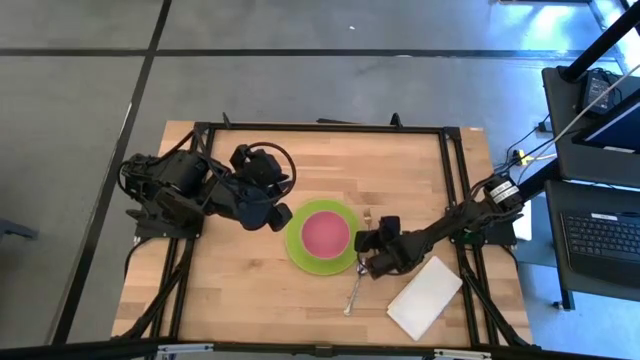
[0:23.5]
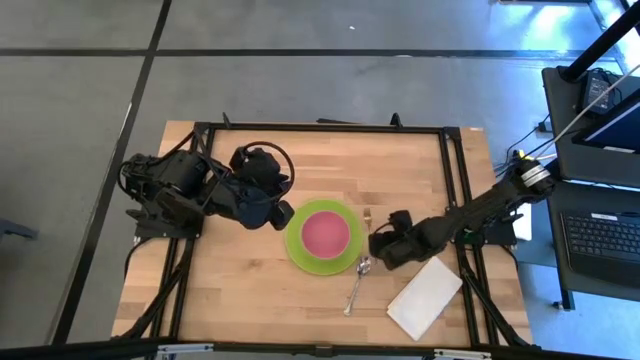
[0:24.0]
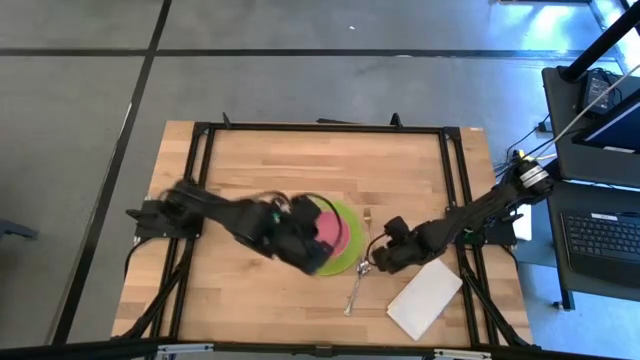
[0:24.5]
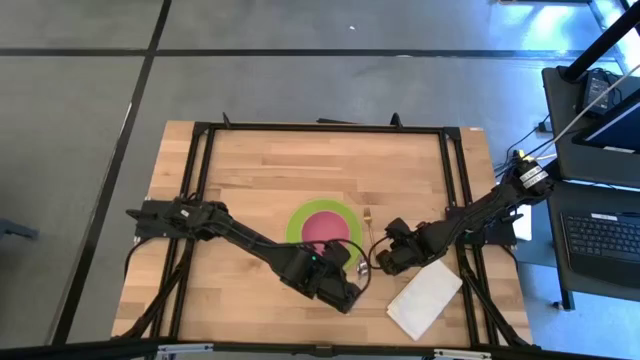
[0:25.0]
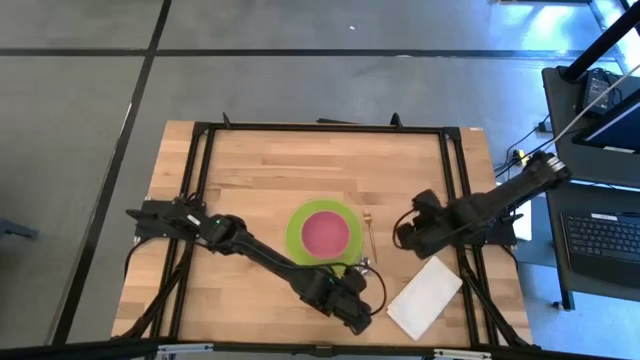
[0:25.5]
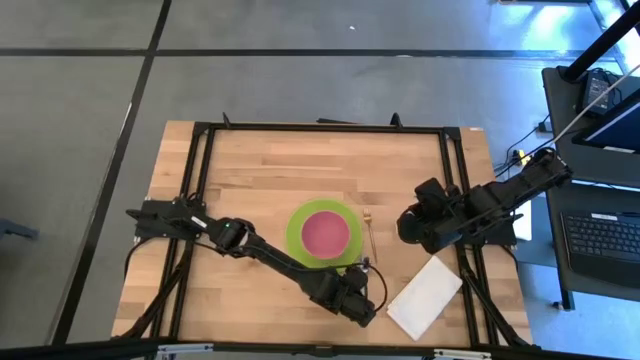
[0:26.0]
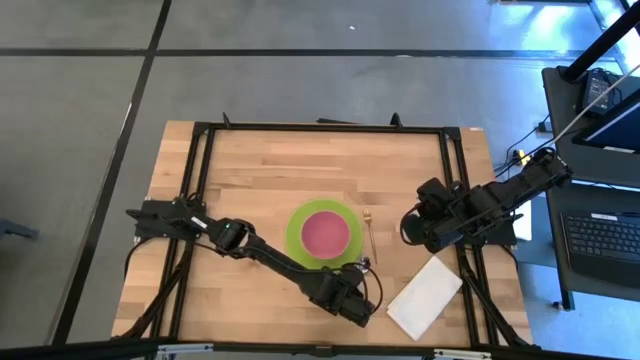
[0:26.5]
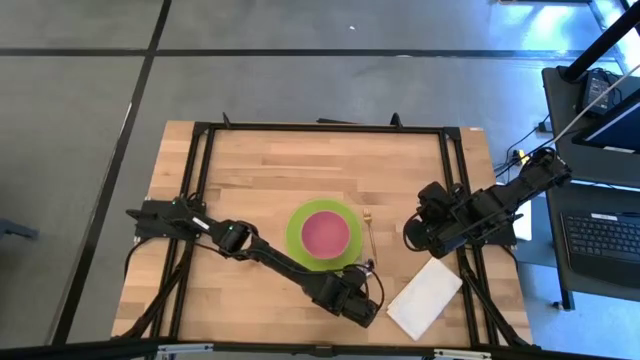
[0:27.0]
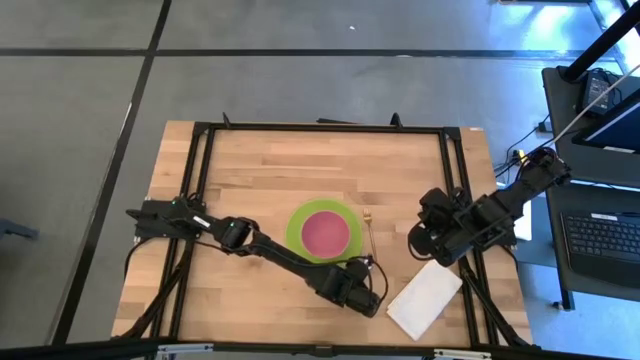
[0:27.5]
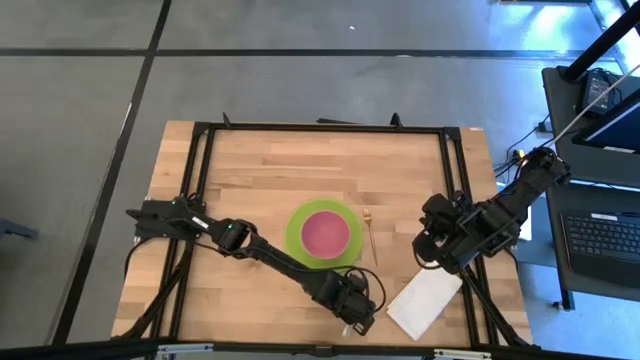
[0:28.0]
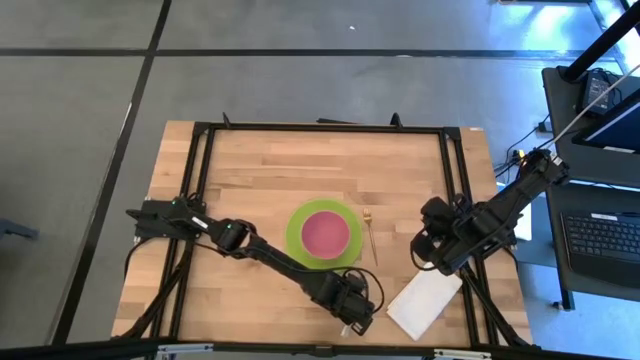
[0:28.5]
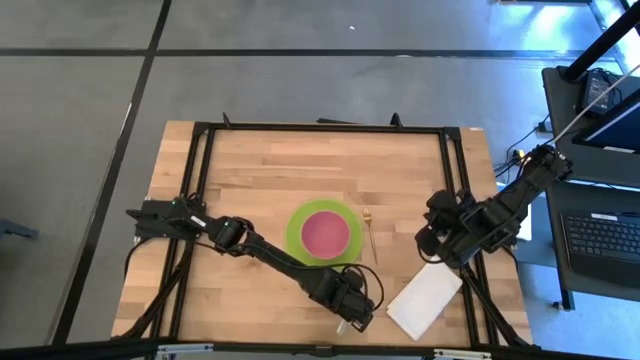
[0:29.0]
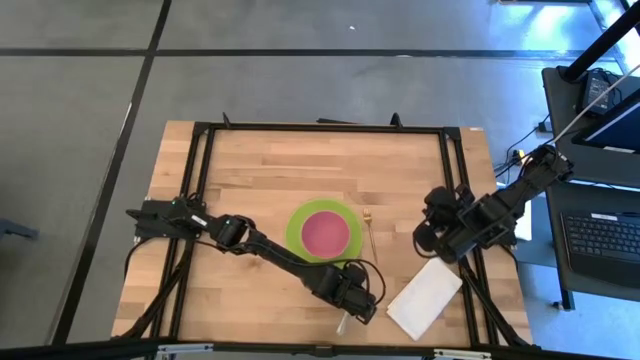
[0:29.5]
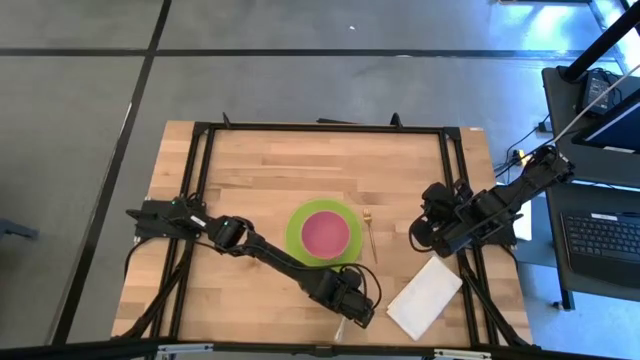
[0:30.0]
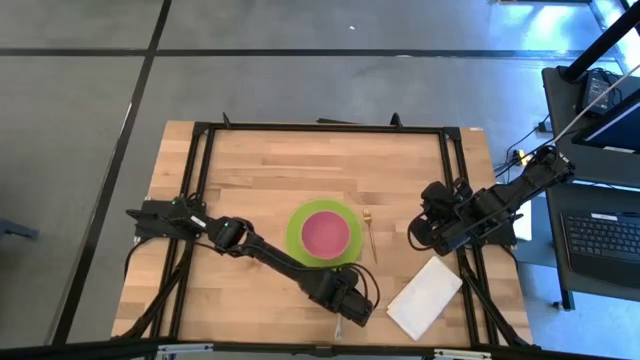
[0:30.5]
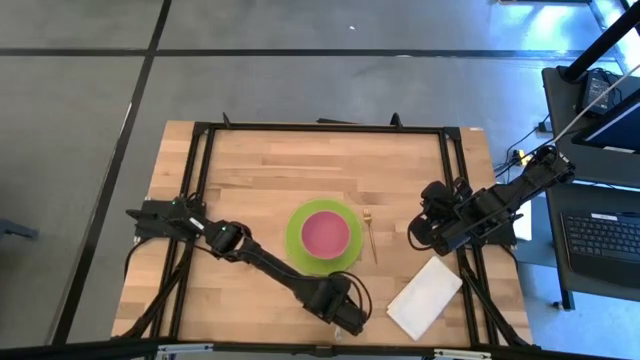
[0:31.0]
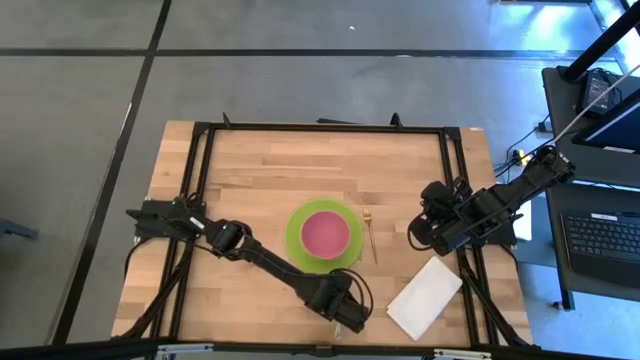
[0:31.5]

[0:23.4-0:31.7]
Task: Set table place
Put the spoon into the pink bowl

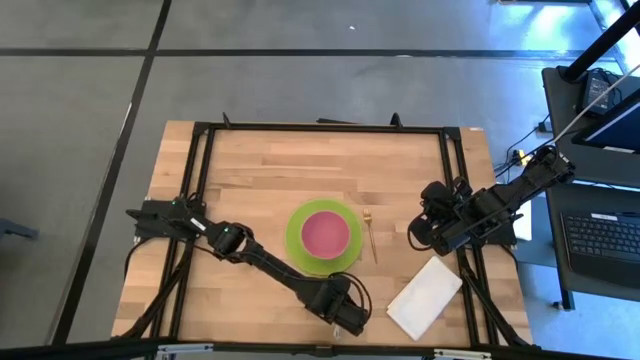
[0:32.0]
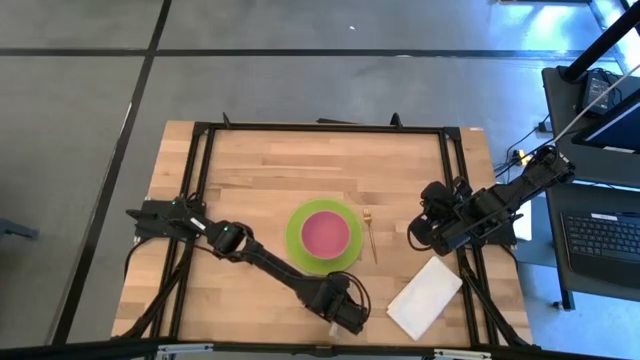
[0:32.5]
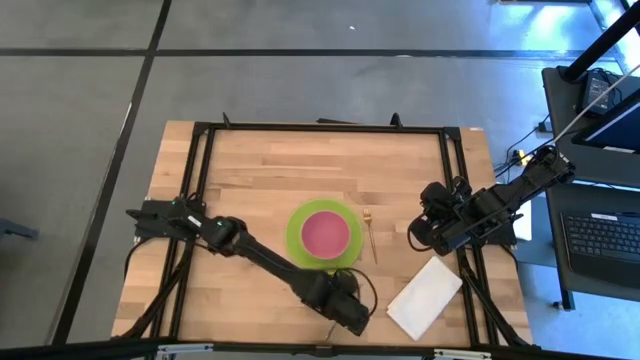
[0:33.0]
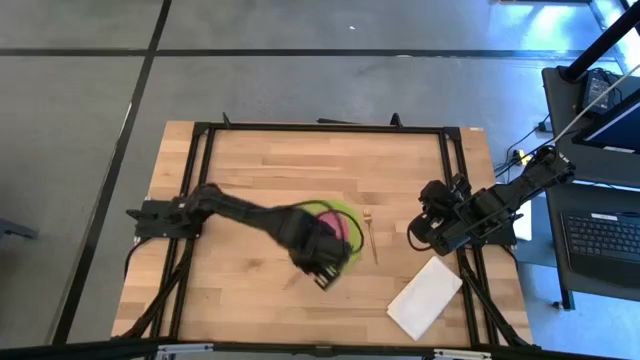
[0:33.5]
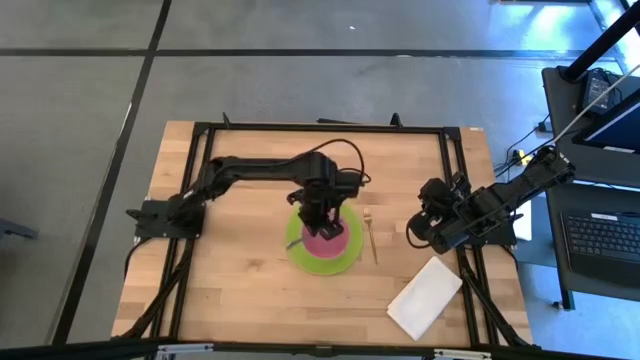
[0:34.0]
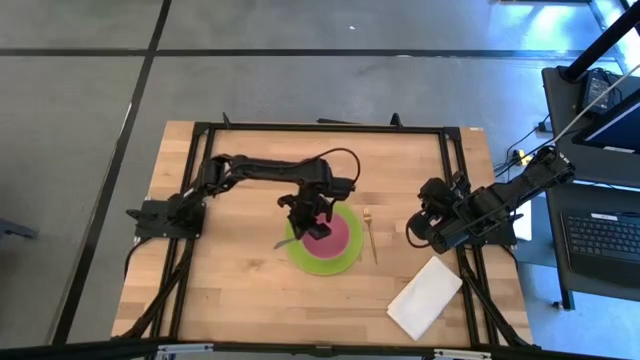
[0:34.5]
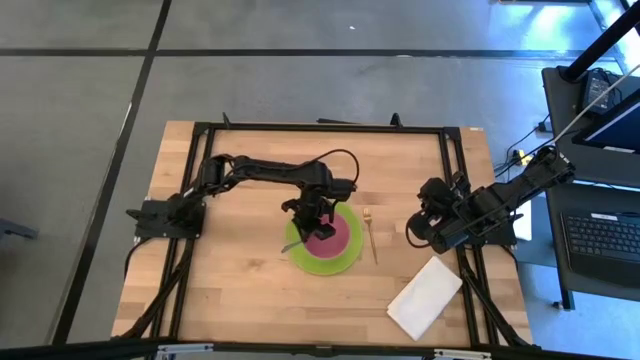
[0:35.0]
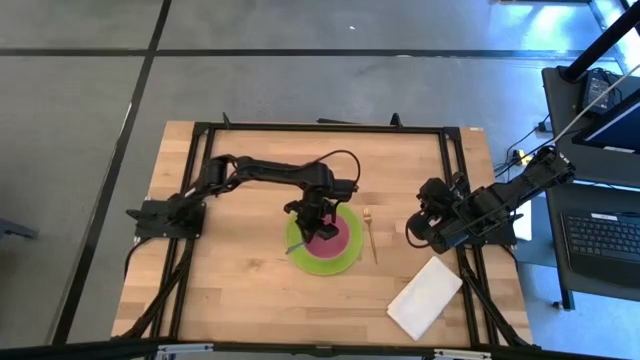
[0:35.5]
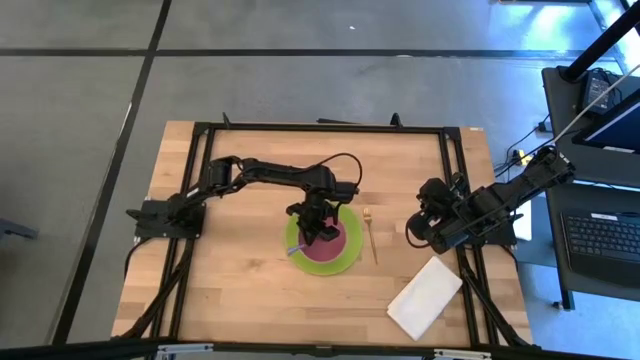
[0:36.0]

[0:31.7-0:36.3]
Put the spoon into the pink bowl

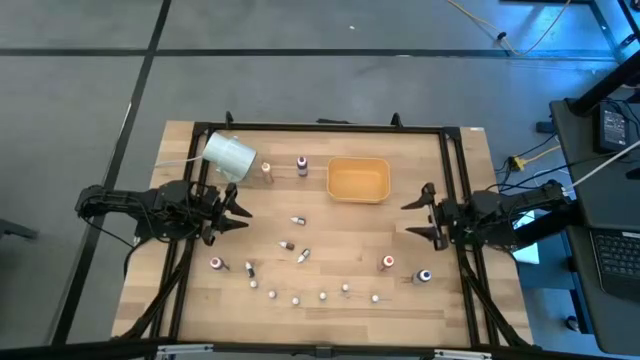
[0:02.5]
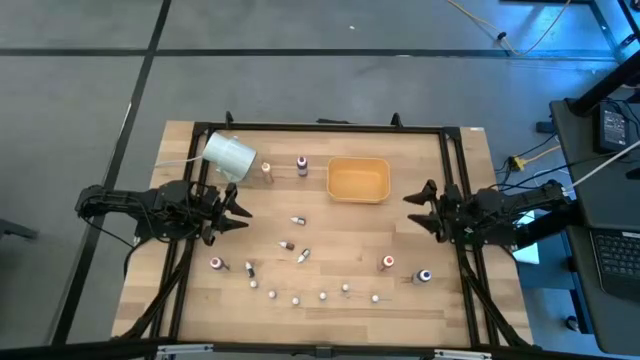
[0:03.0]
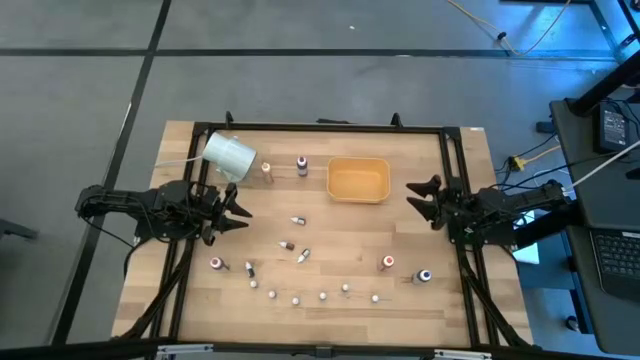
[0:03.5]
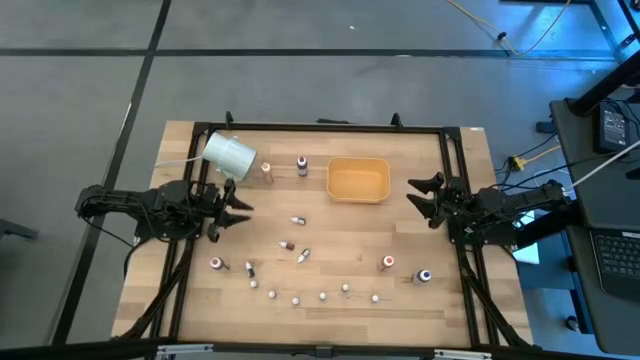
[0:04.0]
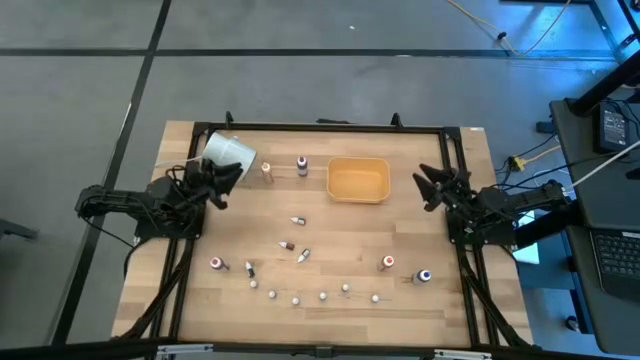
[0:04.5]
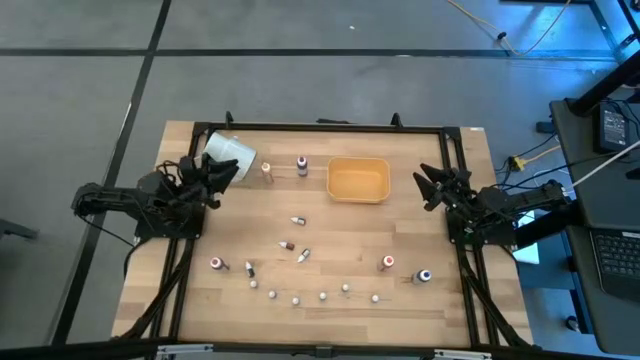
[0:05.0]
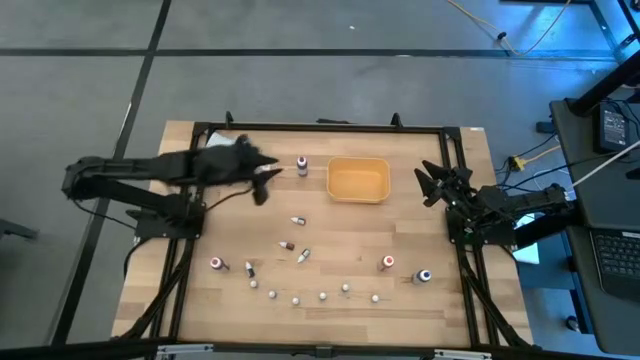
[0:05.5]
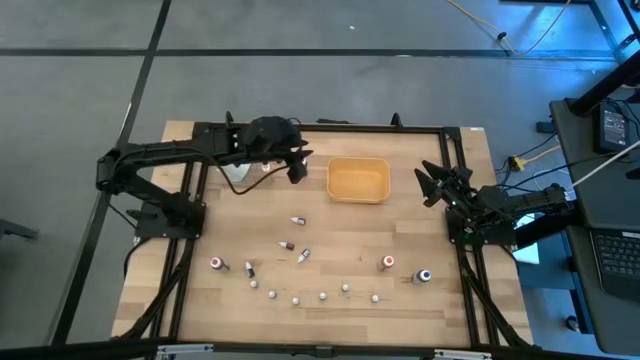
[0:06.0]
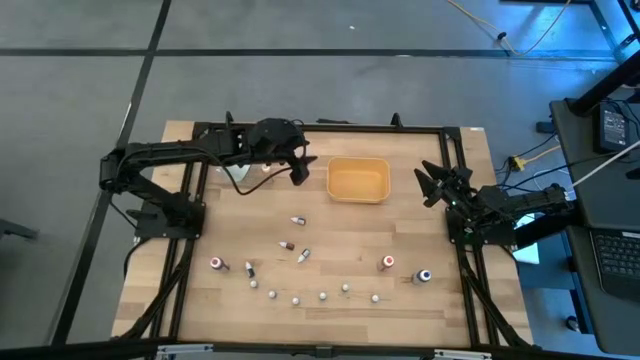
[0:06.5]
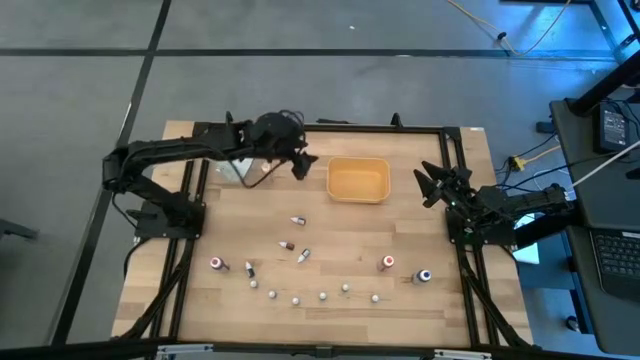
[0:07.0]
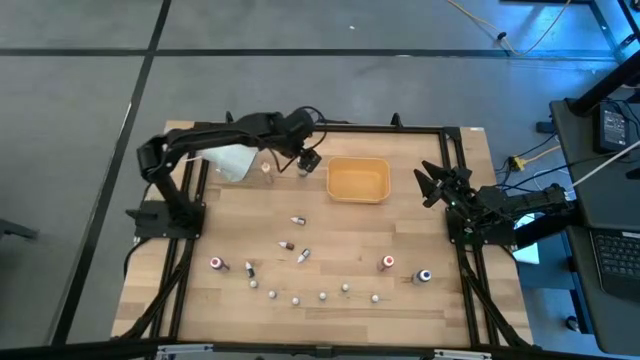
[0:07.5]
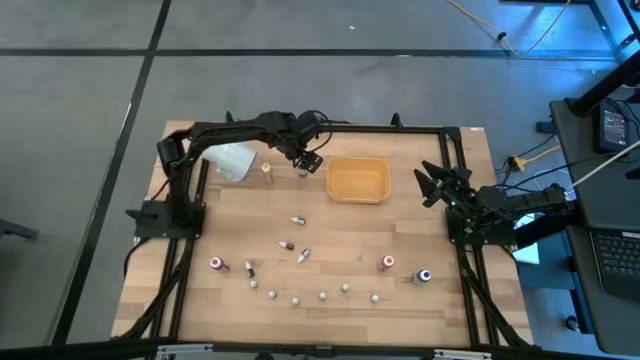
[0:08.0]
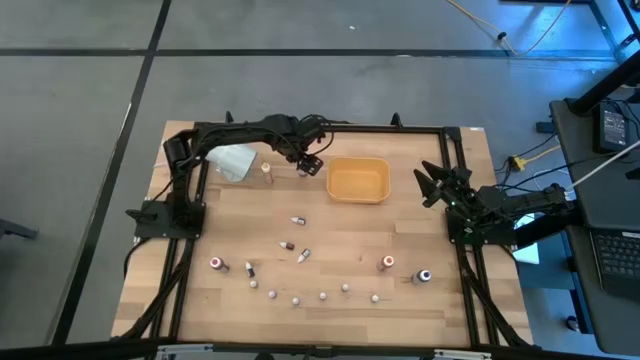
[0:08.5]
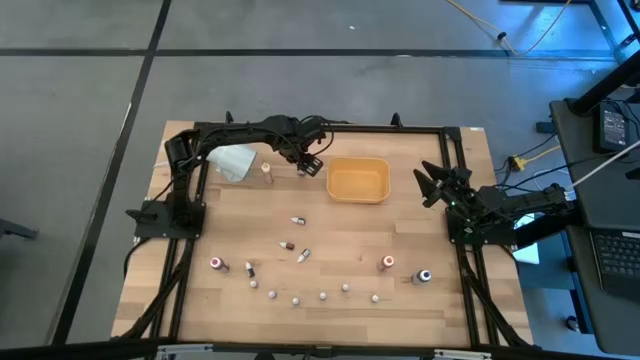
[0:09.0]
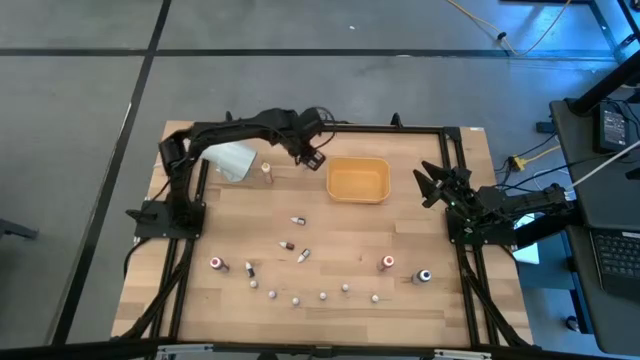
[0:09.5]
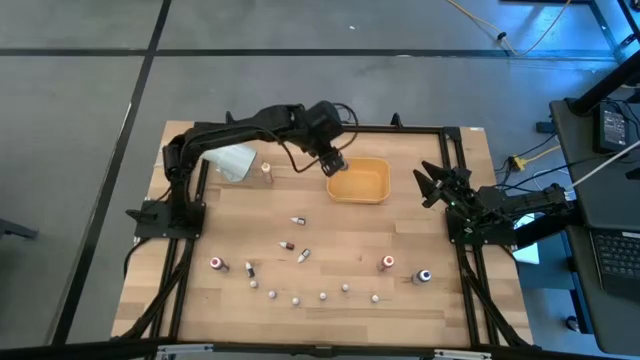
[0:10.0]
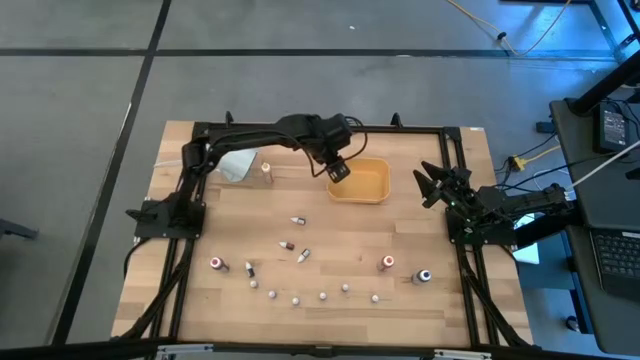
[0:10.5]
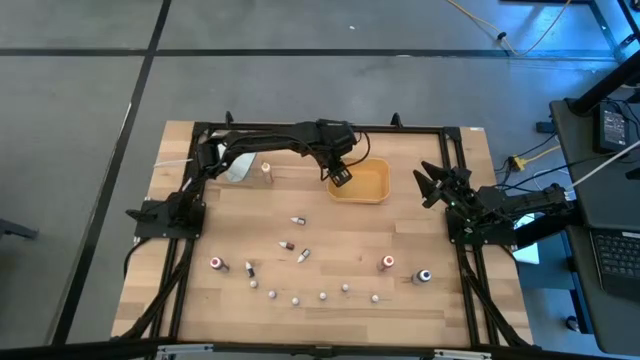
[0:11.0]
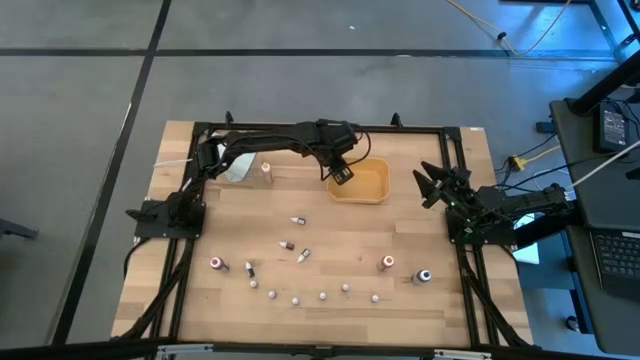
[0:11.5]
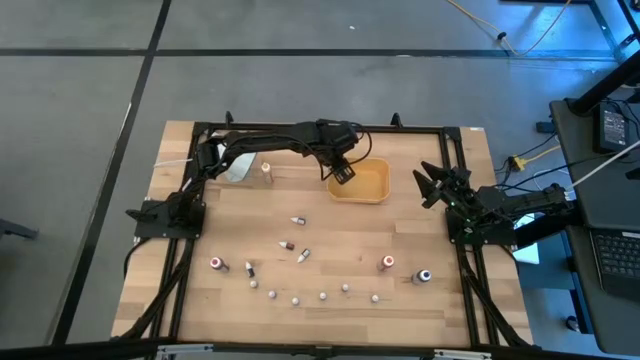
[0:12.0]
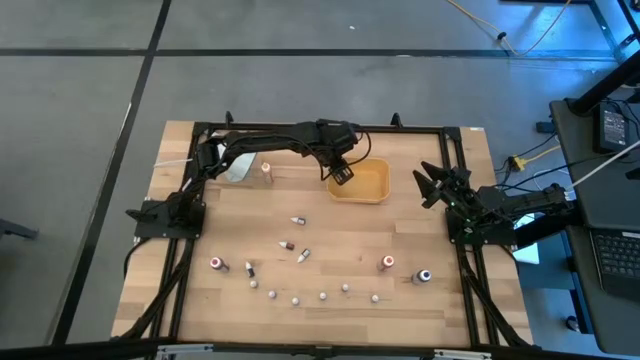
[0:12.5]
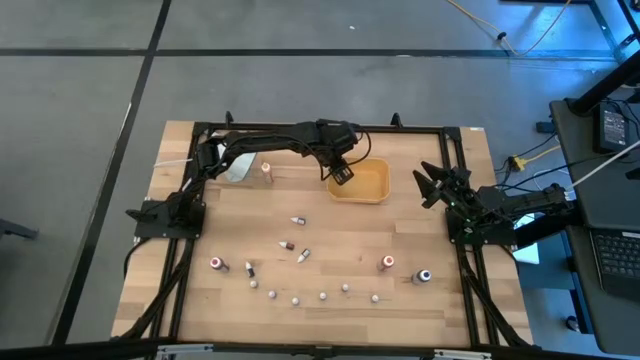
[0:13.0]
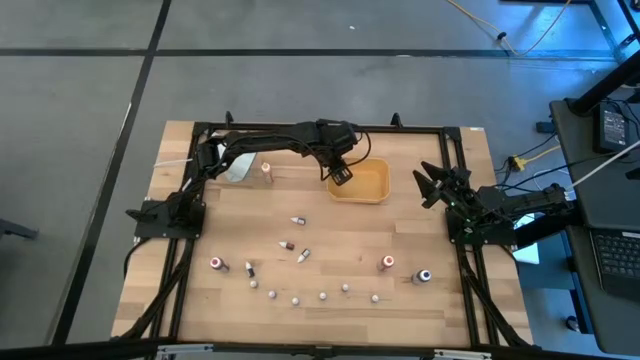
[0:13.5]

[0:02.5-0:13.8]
Task: Pick & Place food coloring
Put the large violet food coloring bottles into the yellow bin
